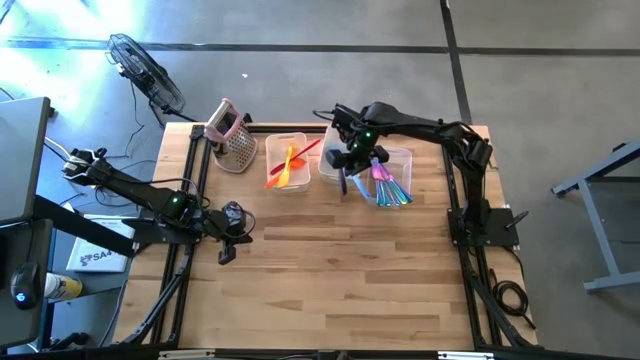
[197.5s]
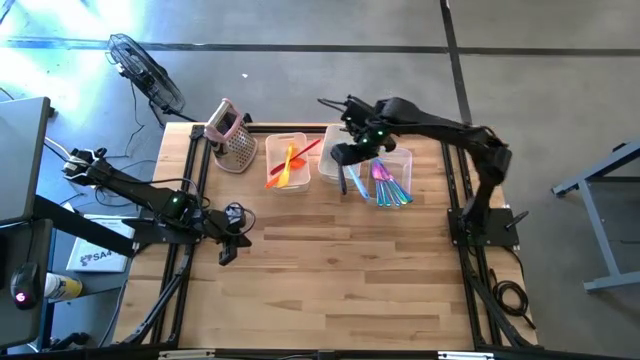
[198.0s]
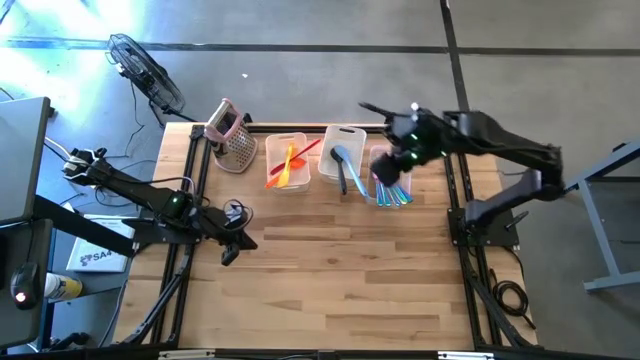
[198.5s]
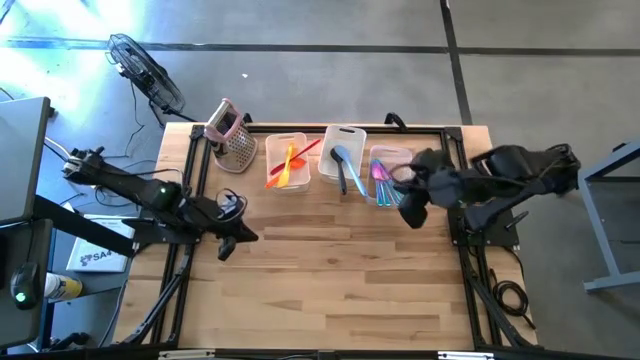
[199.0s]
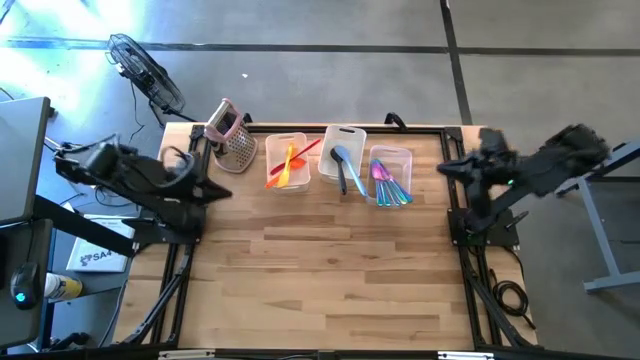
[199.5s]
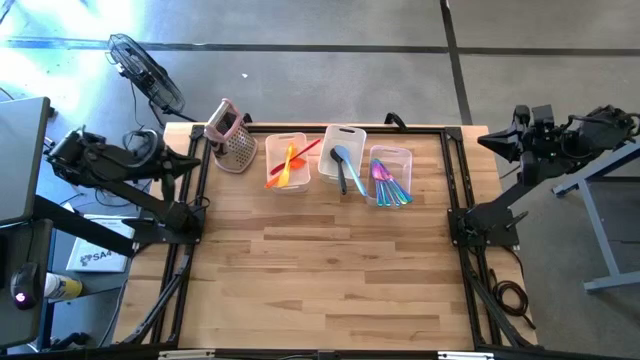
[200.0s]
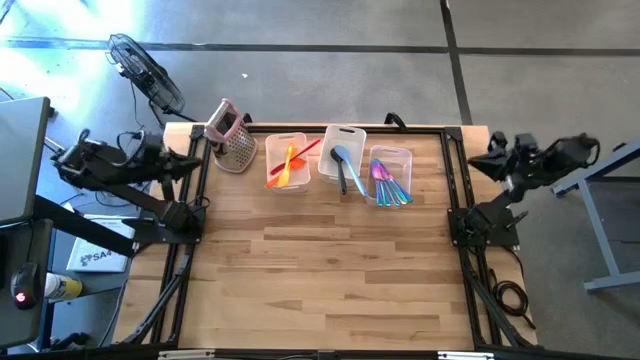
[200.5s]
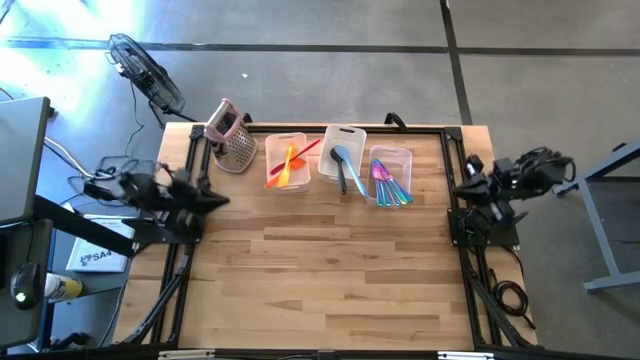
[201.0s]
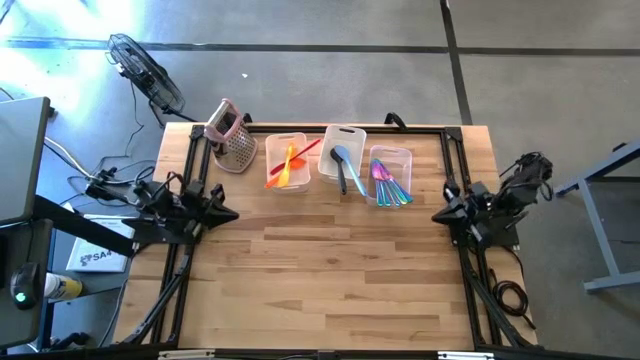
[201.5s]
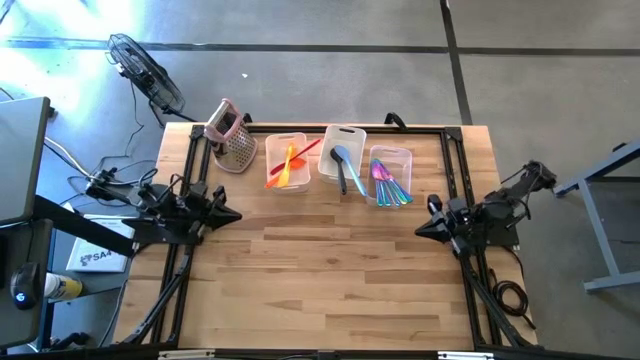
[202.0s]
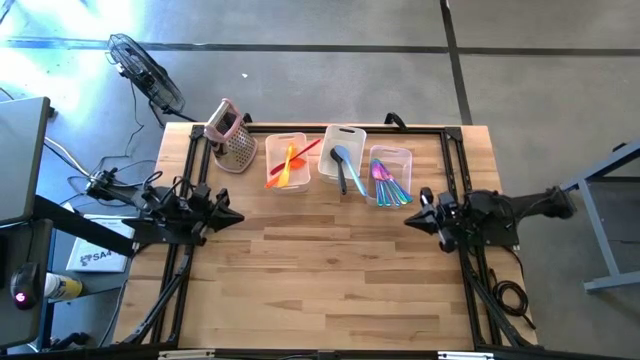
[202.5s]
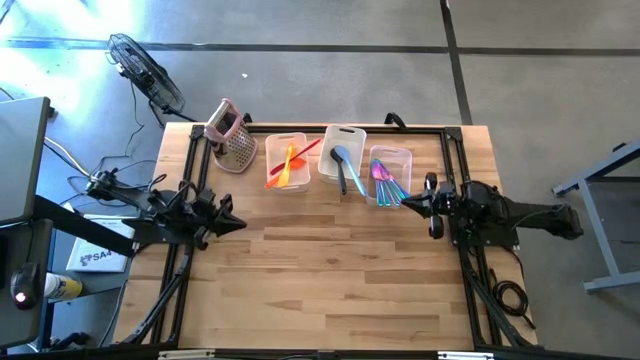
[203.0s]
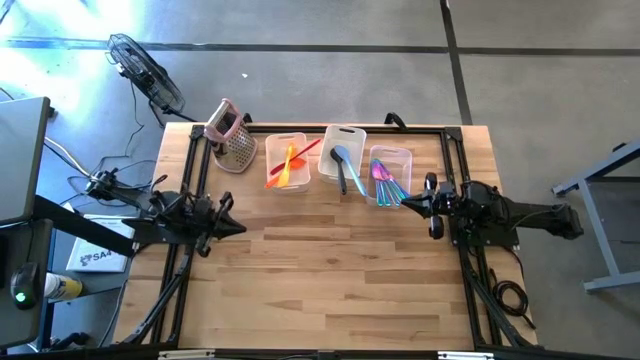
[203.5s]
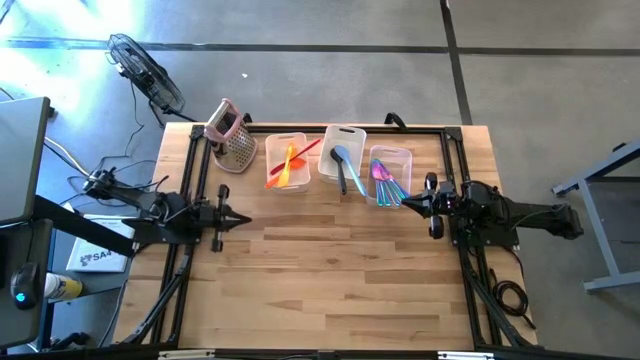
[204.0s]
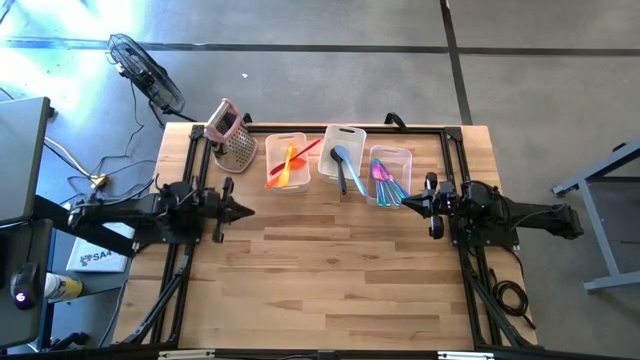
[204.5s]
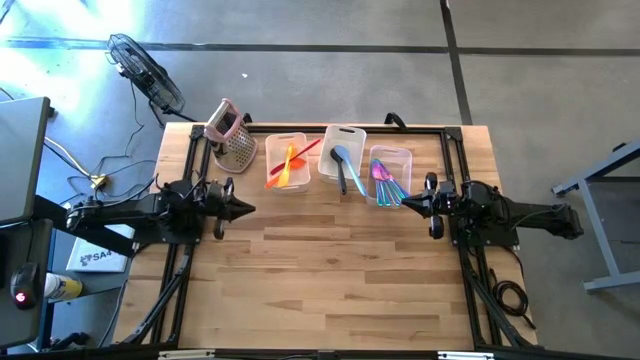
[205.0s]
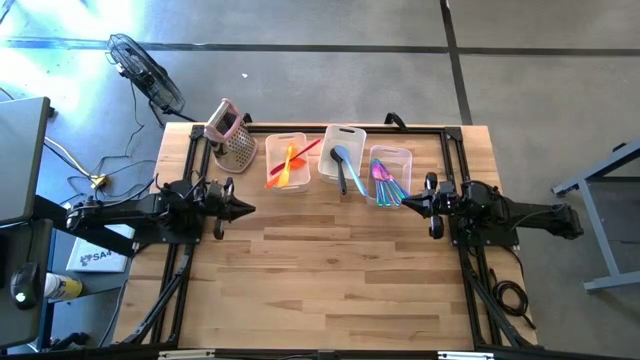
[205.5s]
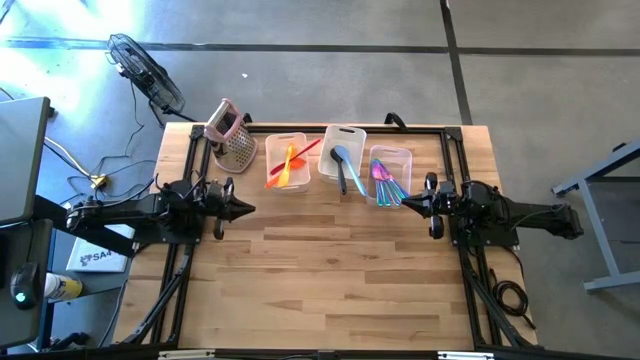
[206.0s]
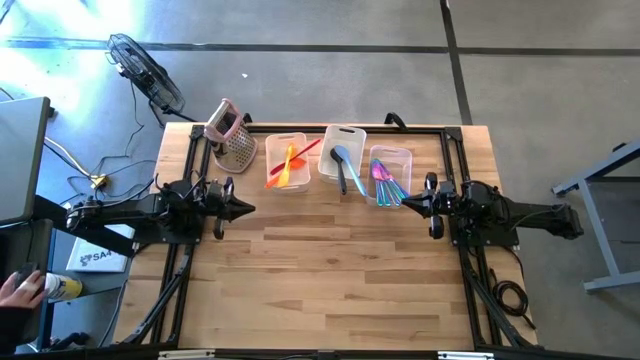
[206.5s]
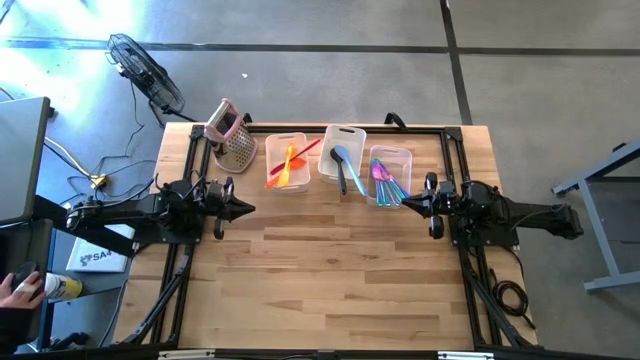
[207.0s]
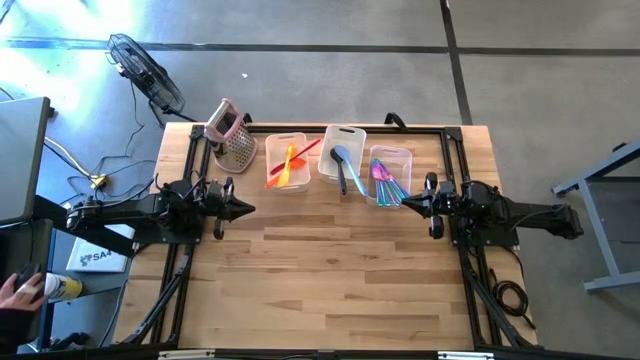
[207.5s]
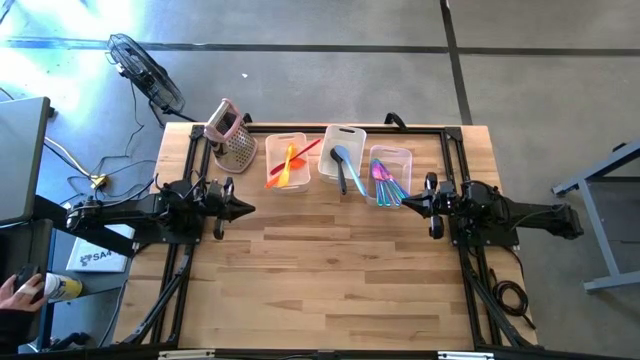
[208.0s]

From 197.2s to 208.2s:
Task: Pick & Place Kitchen Items
Return to Home Position

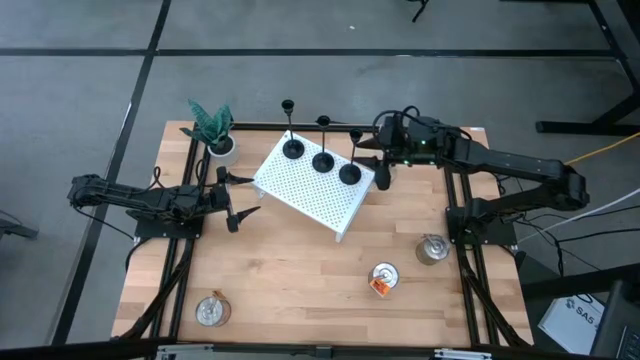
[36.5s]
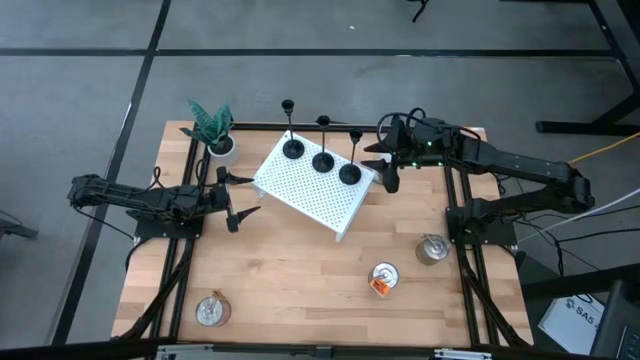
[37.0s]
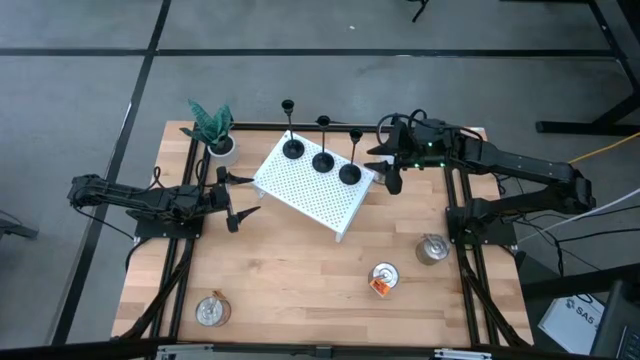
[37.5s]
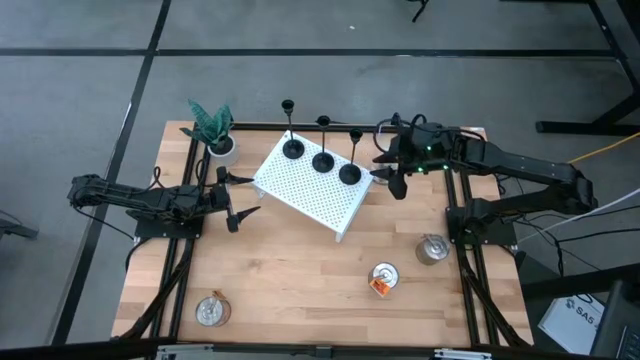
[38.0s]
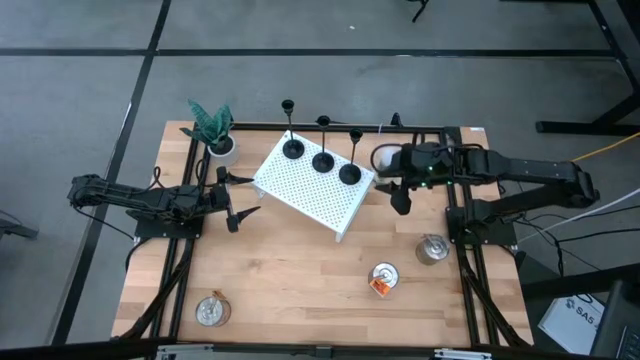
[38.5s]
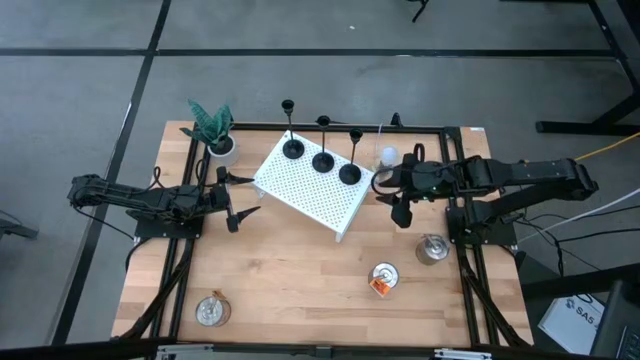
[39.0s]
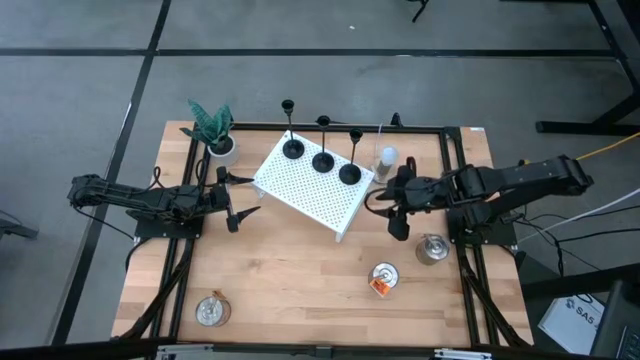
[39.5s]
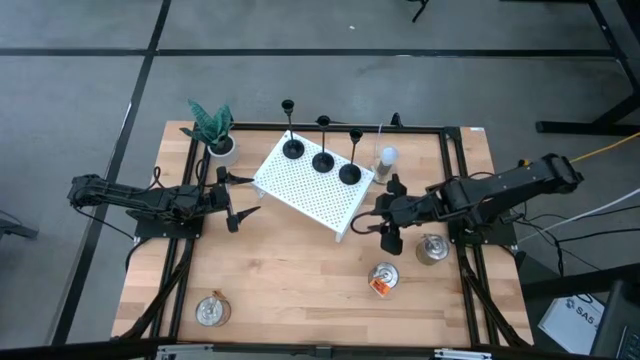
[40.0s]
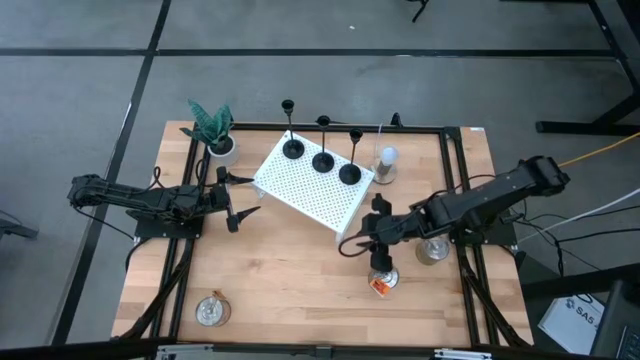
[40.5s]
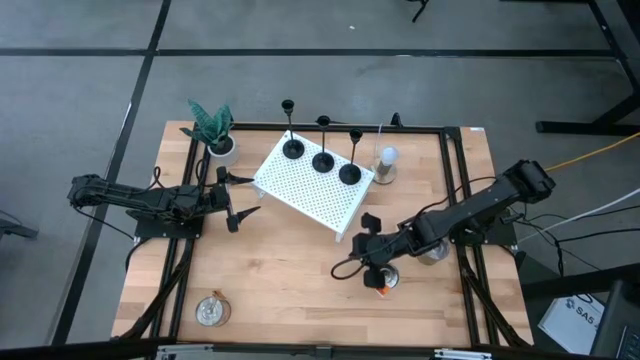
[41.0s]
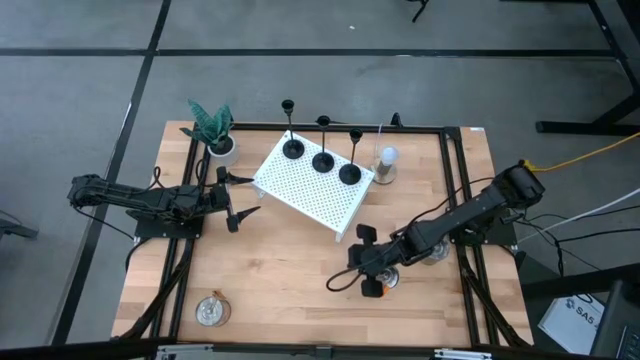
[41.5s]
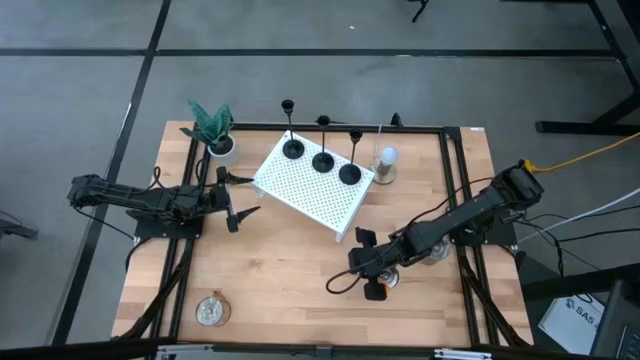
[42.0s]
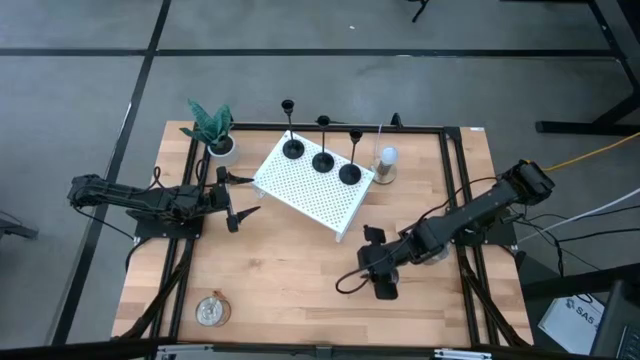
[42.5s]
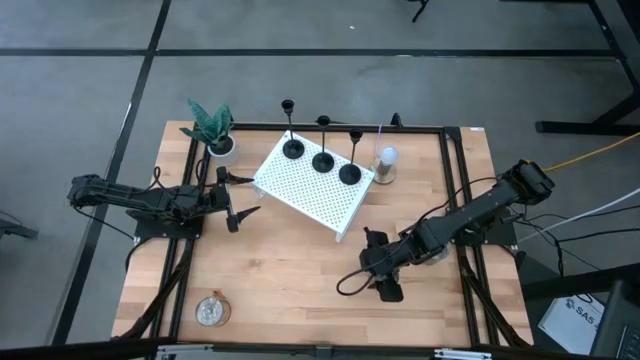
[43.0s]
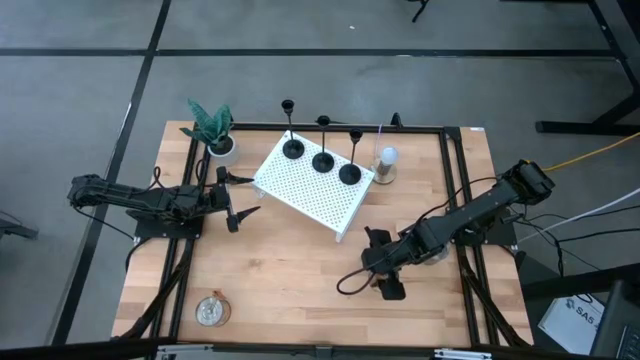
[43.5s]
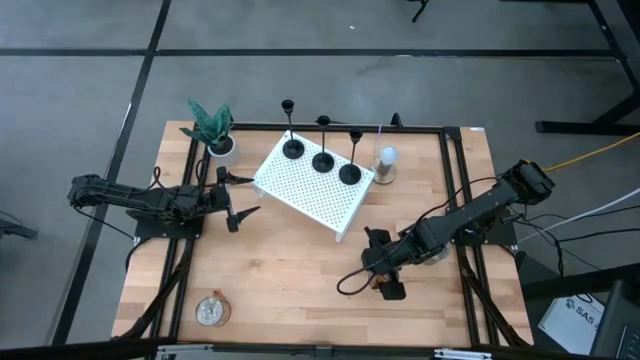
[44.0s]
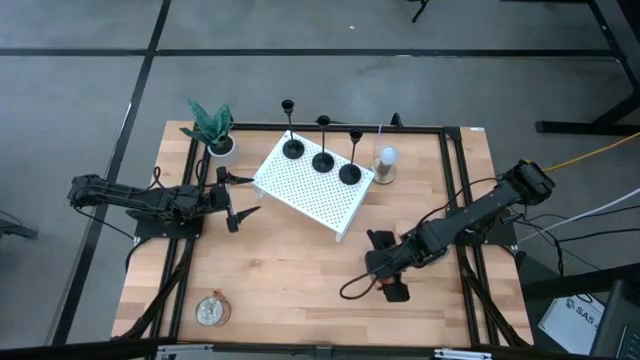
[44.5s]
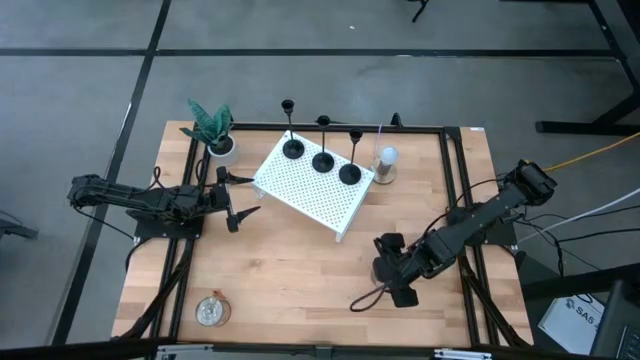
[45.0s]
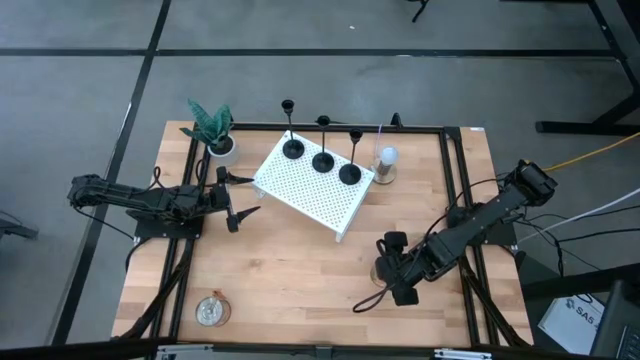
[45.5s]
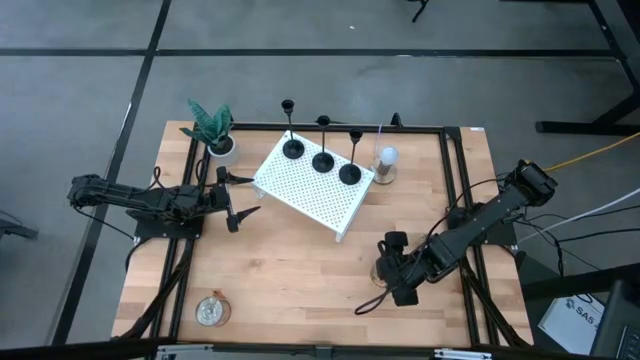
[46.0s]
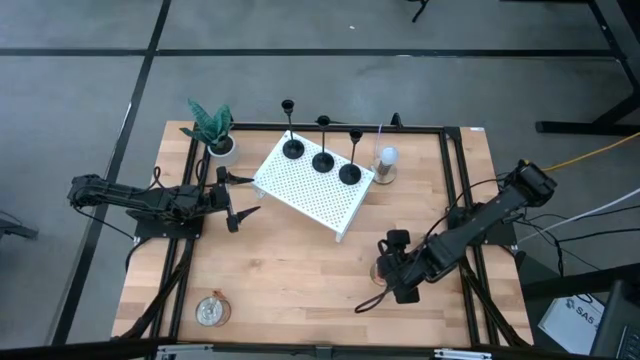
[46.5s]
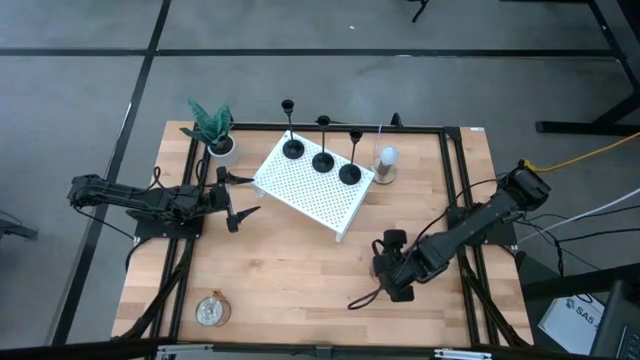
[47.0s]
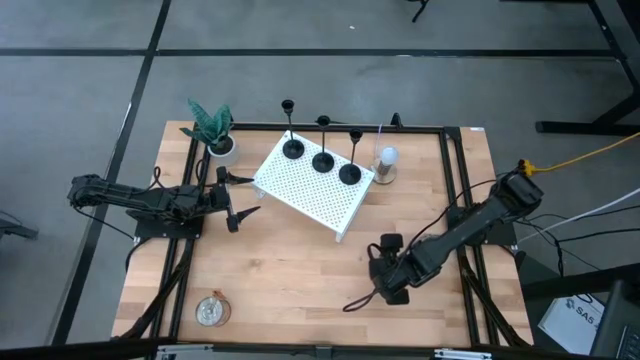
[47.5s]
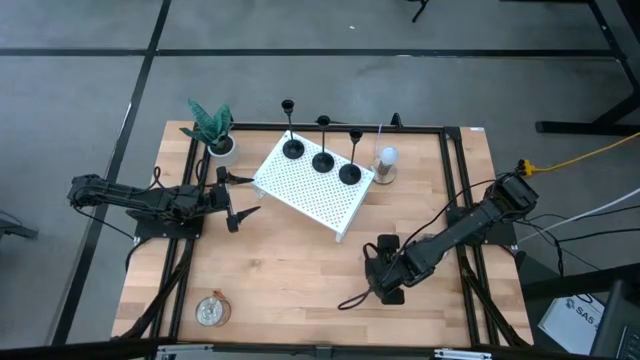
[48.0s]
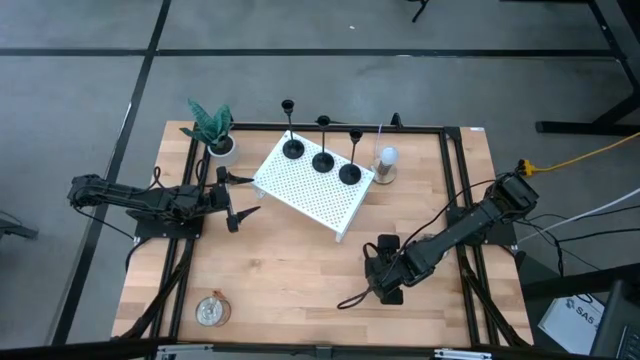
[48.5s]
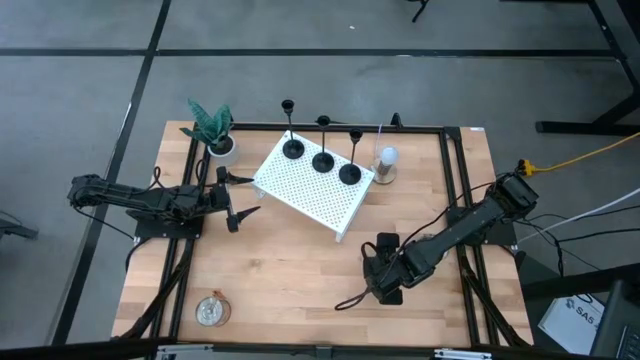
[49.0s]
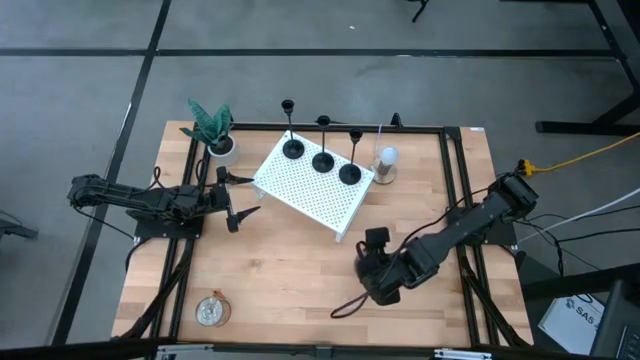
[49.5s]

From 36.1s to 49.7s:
Task: Pick & Place candle stick holders
Put the top orange scented candle on the shelf
